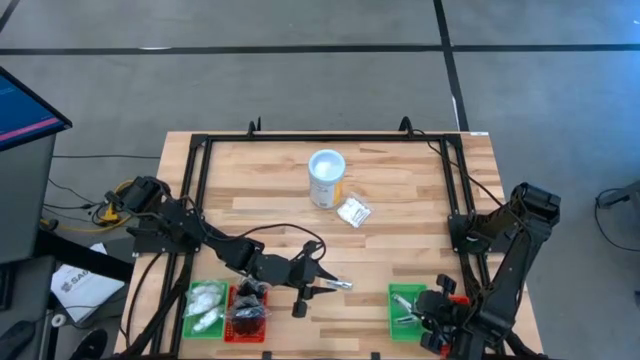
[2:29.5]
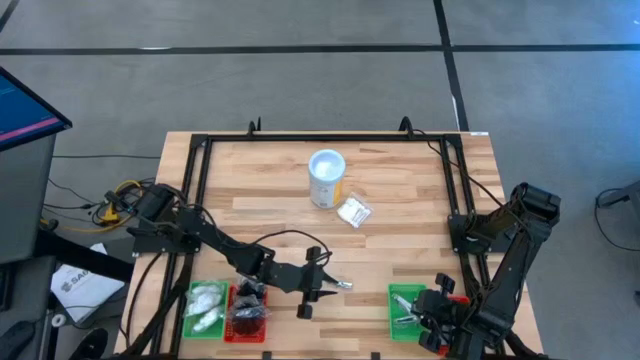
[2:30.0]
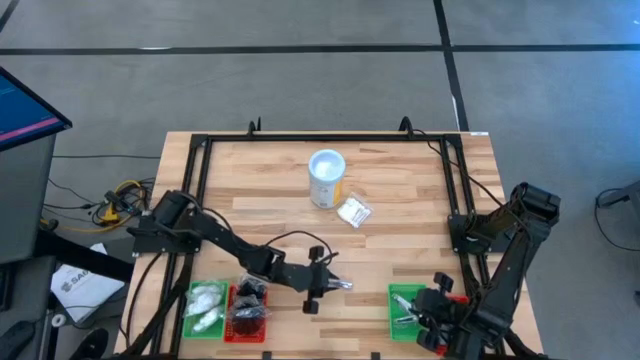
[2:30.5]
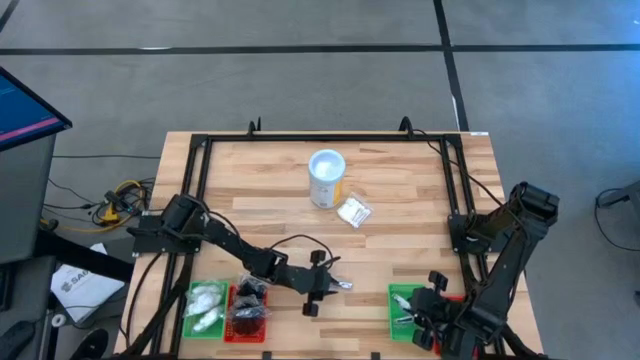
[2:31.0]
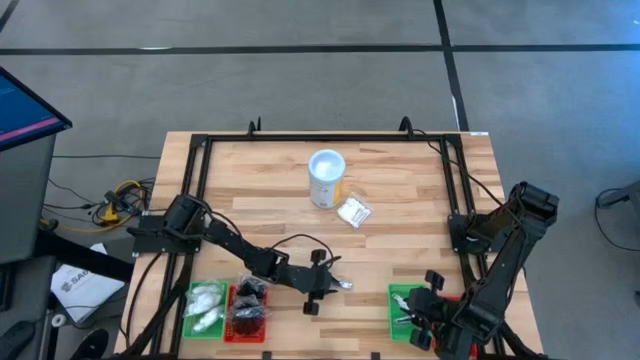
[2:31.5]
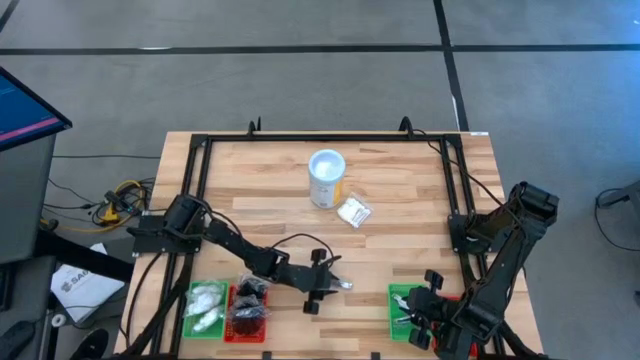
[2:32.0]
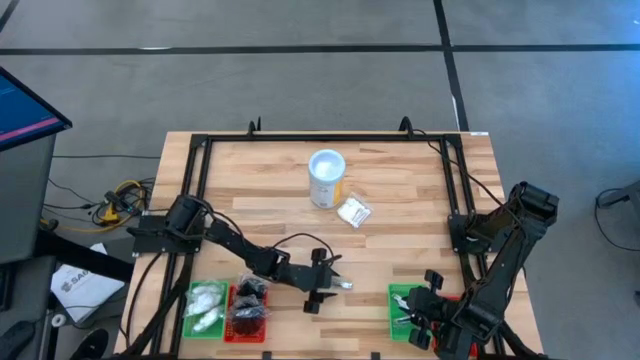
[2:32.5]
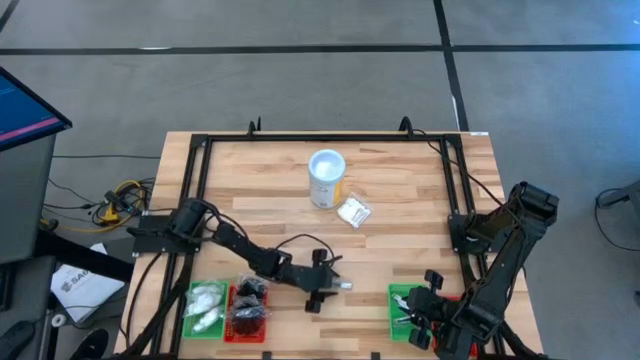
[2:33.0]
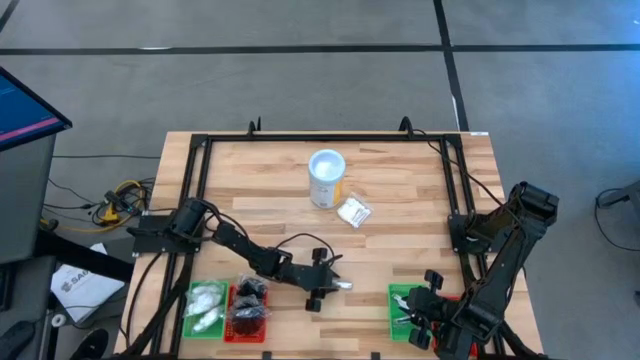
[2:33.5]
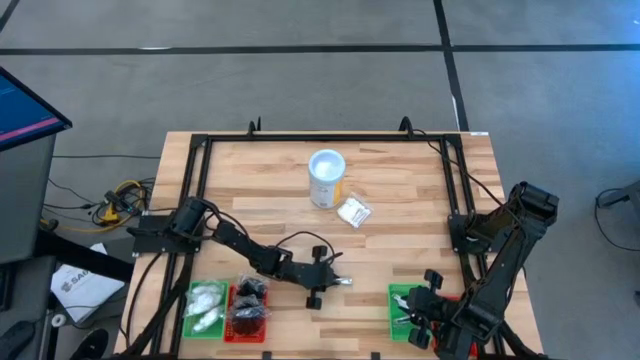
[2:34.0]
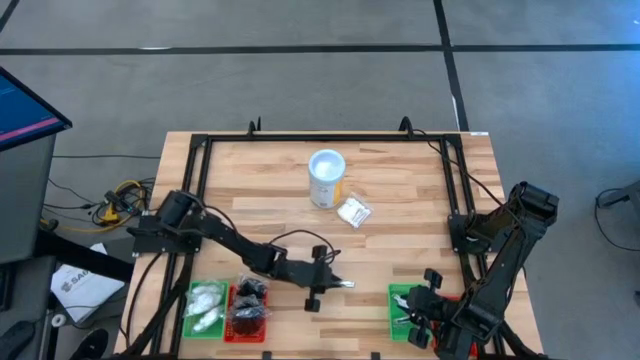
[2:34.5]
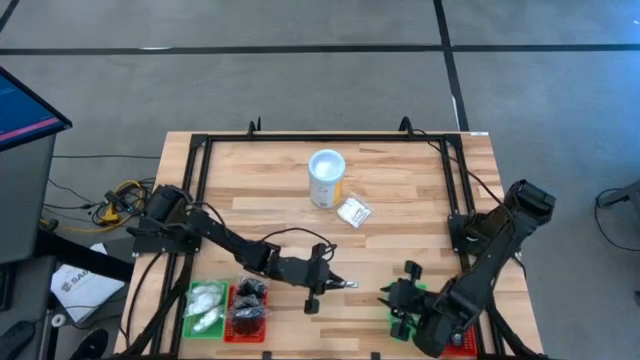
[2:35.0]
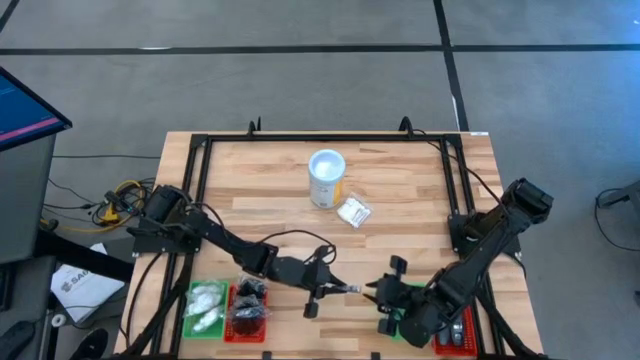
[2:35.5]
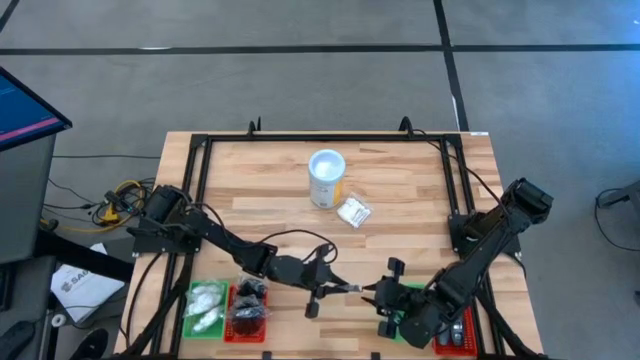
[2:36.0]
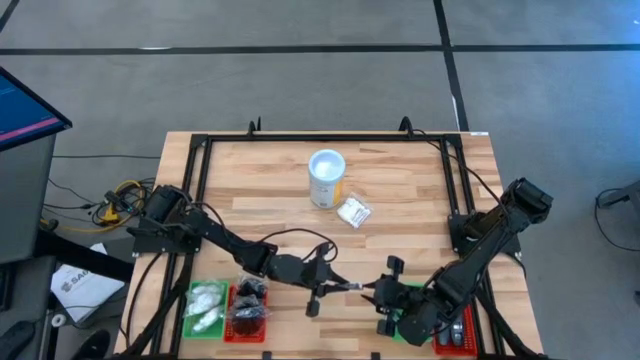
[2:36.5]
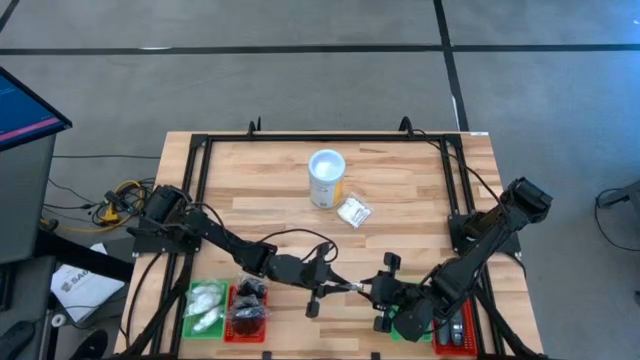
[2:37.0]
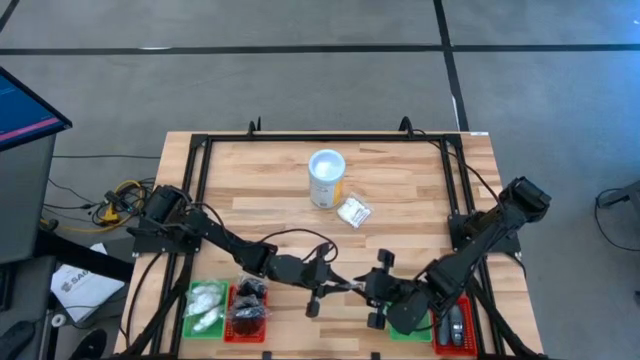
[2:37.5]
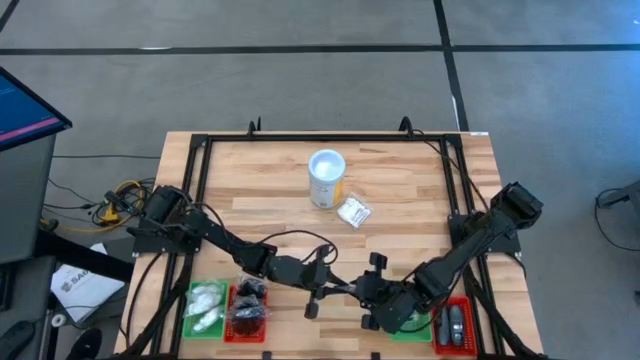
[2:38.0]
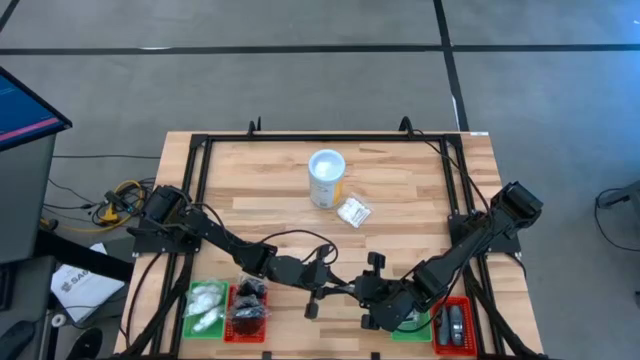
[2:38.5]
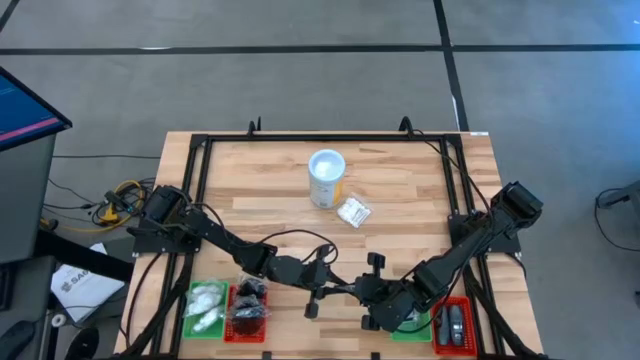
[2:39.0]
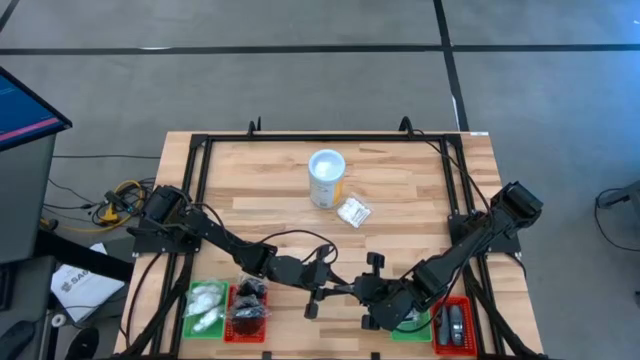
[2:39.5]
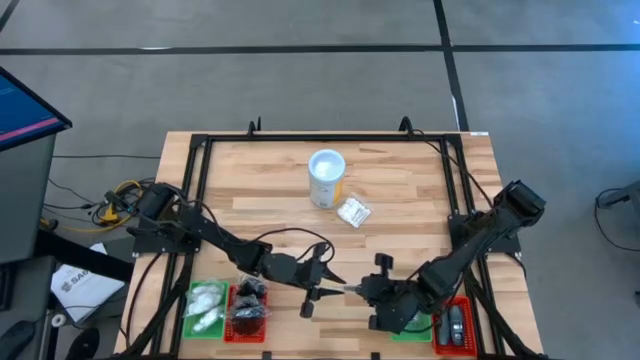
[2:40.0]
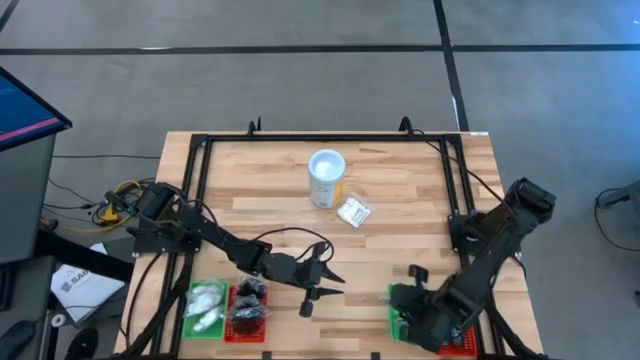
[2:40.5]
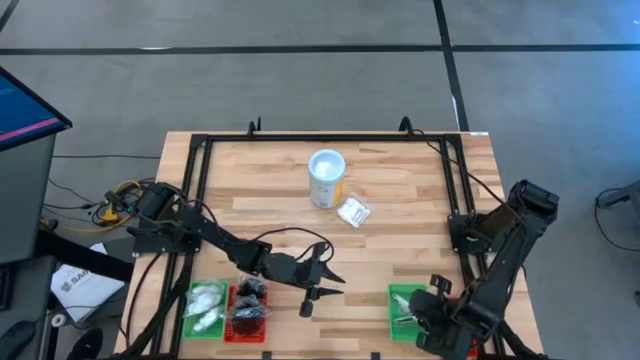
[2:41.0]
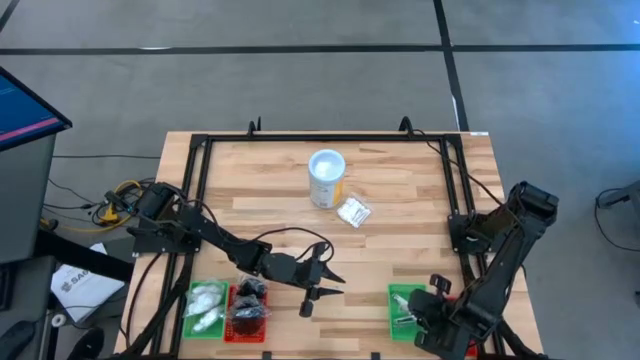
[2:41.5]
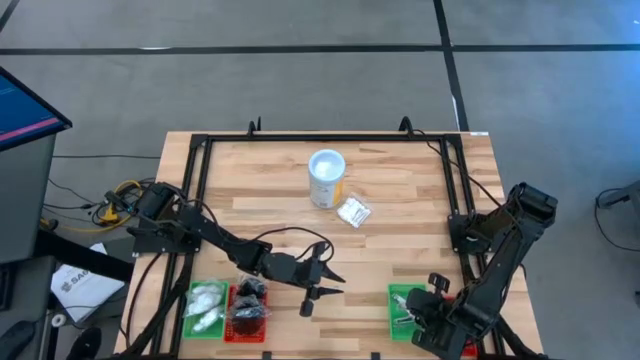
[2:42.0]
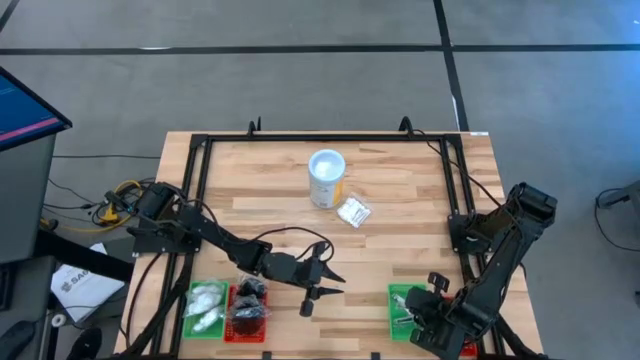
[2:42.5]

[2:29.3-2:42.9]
Task: Pick & Place Travel size toiletries
Put the nail cutter into the right green bin

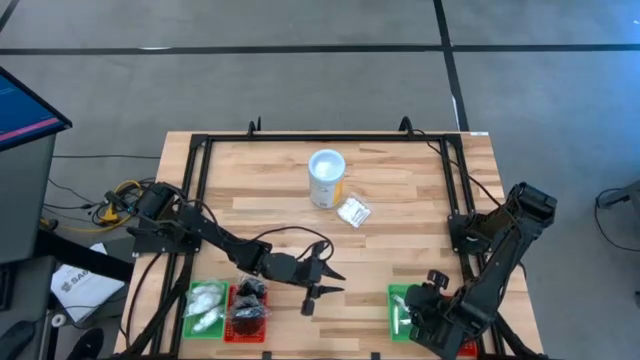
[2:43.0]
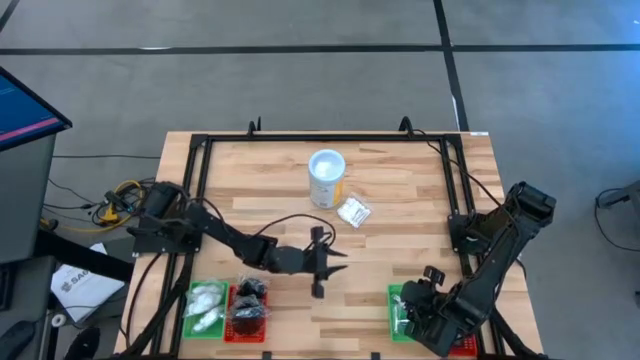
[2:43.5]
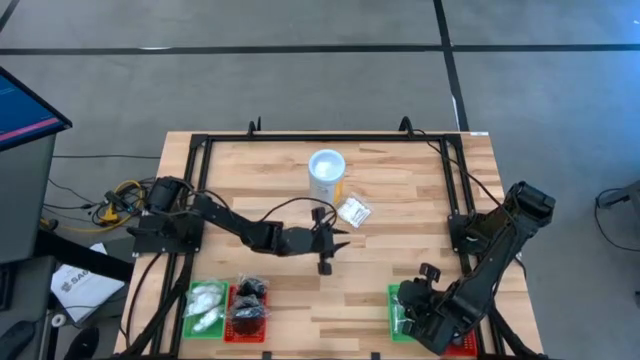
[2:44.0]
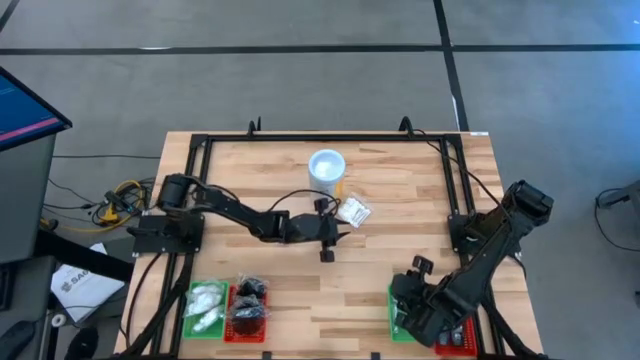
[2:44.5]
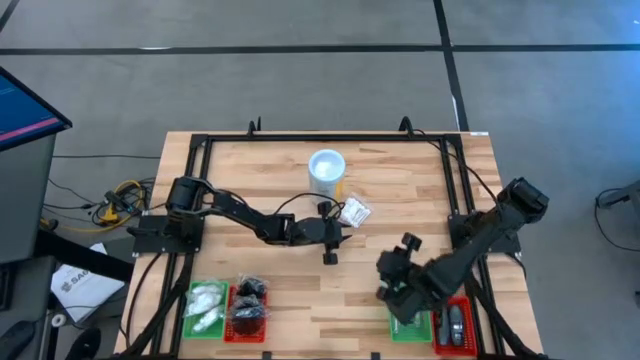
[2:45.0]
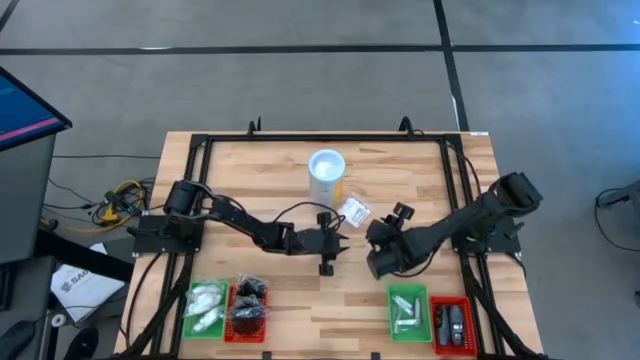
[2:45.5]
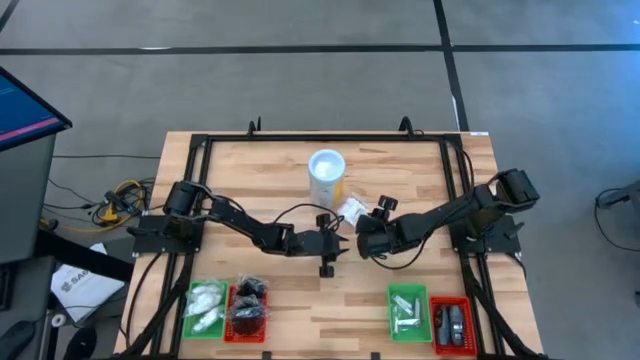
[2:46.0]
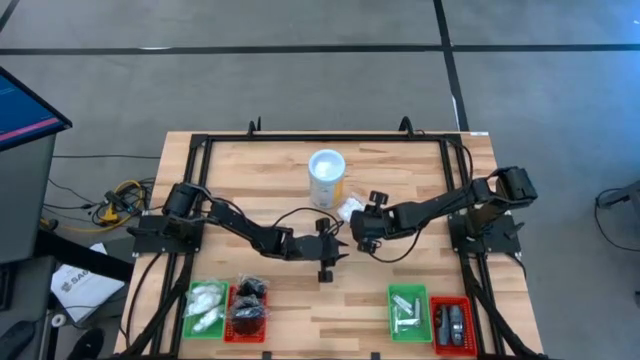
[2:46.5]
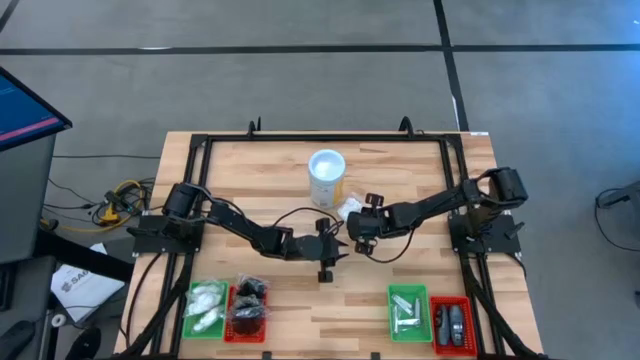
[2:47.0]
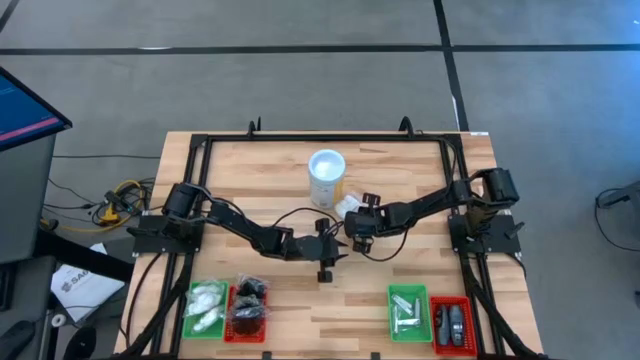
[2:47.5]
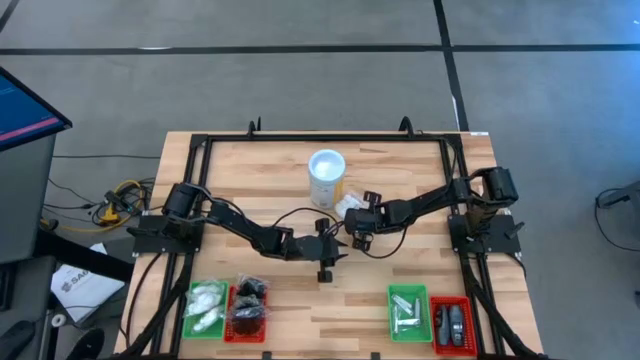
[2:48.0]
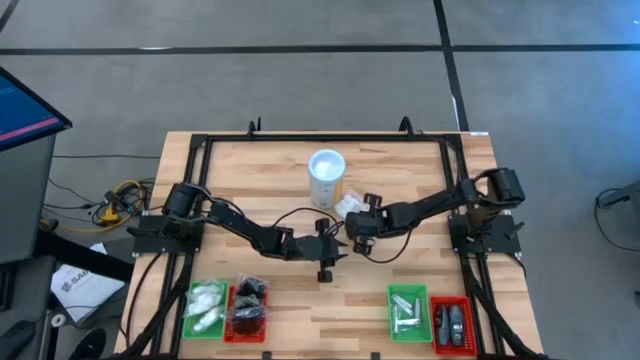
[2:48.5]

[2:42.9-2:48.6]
Put the cotton pack into the left green bin
